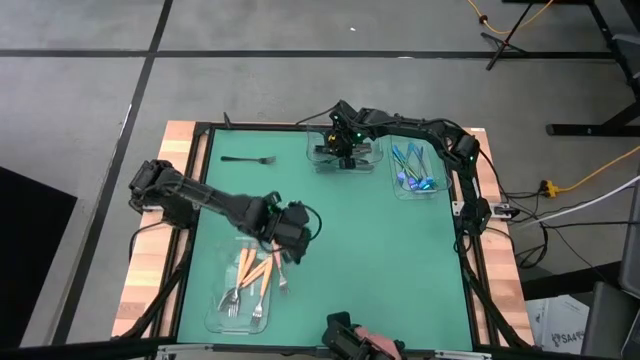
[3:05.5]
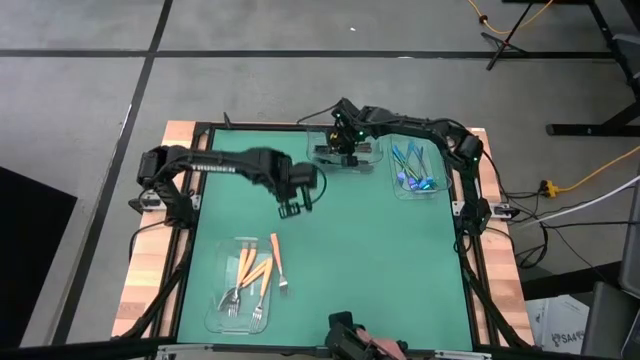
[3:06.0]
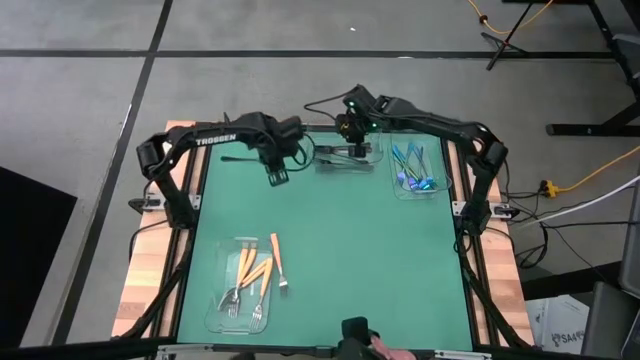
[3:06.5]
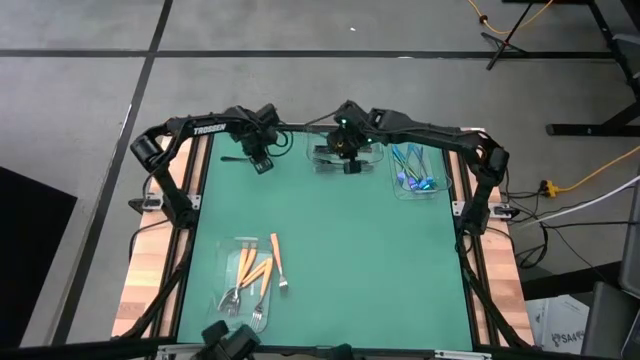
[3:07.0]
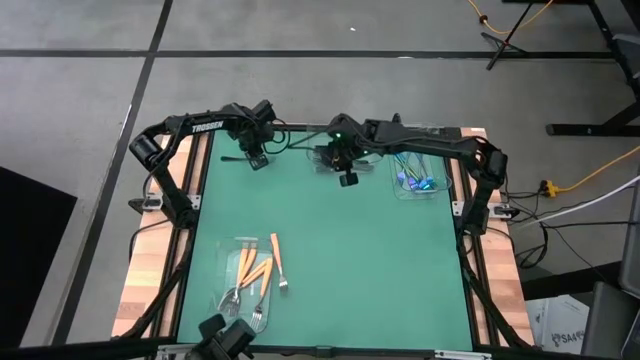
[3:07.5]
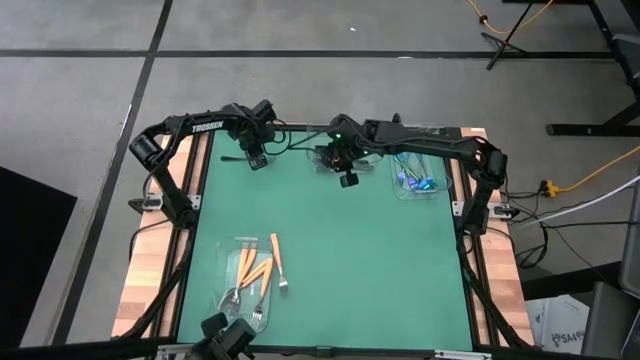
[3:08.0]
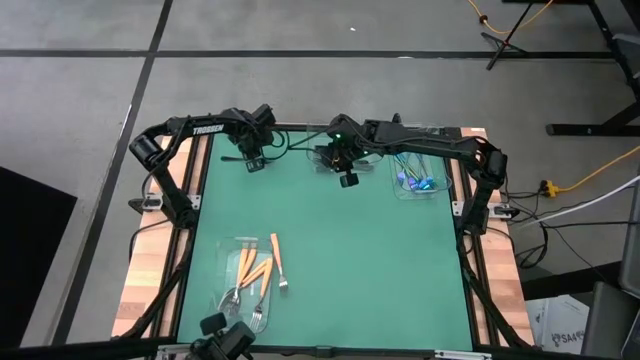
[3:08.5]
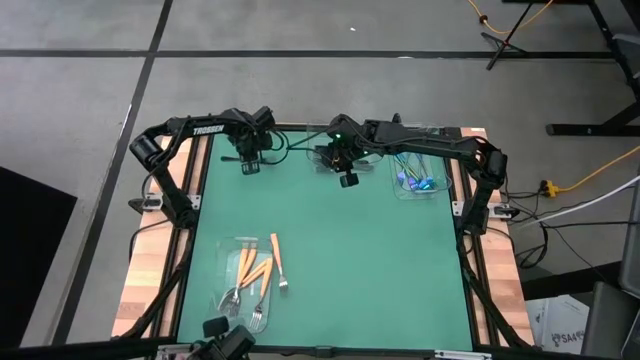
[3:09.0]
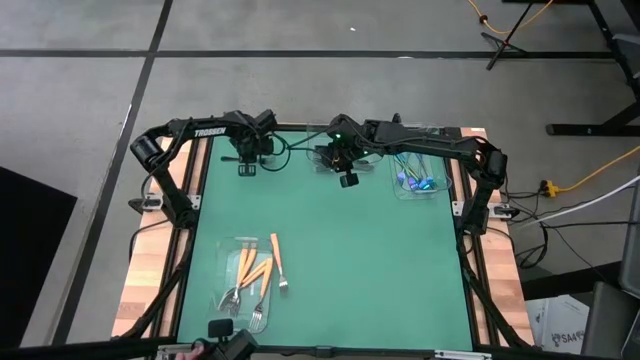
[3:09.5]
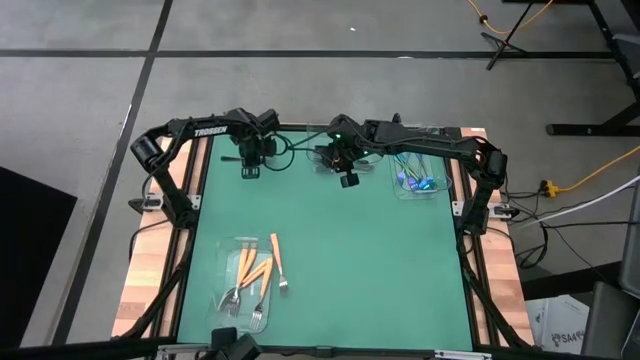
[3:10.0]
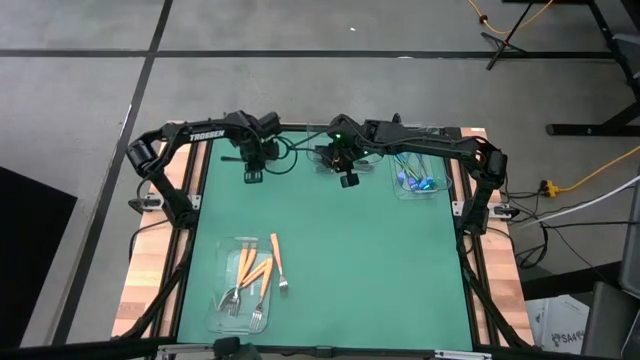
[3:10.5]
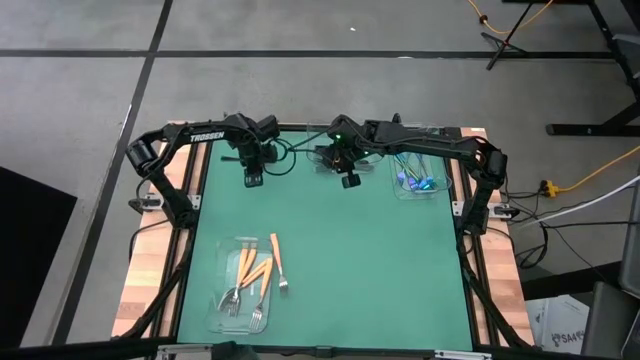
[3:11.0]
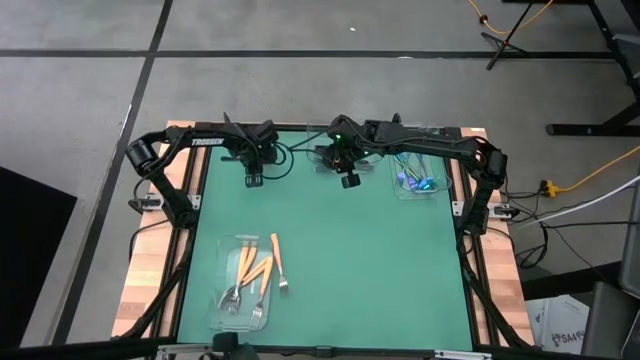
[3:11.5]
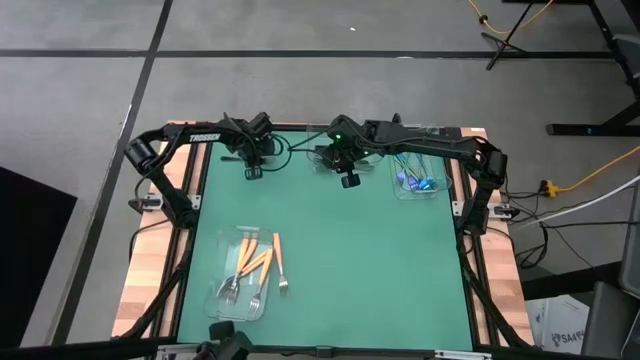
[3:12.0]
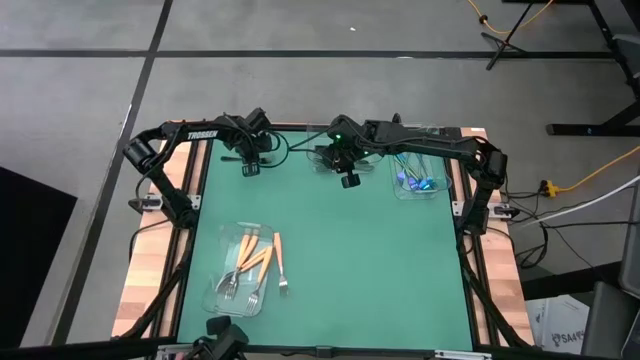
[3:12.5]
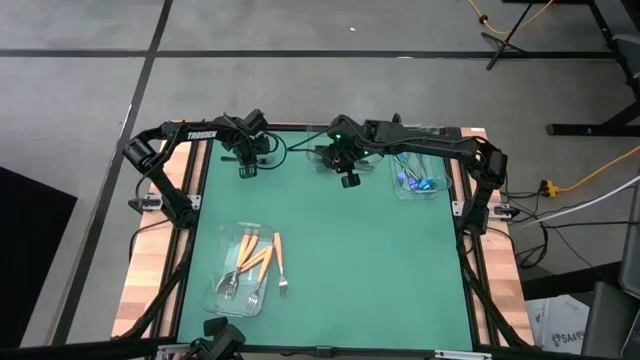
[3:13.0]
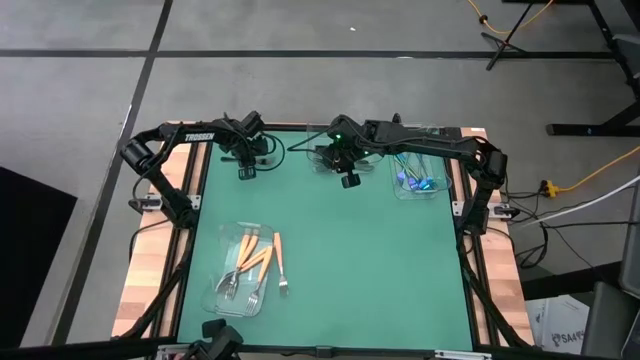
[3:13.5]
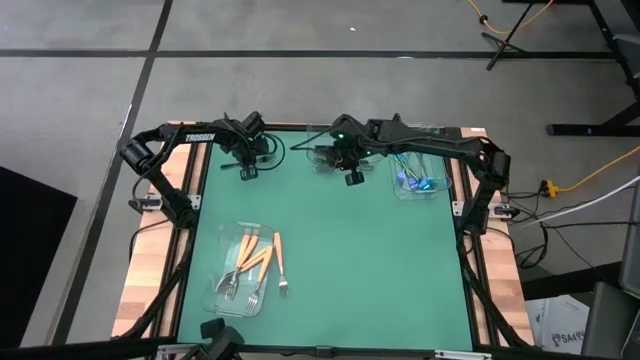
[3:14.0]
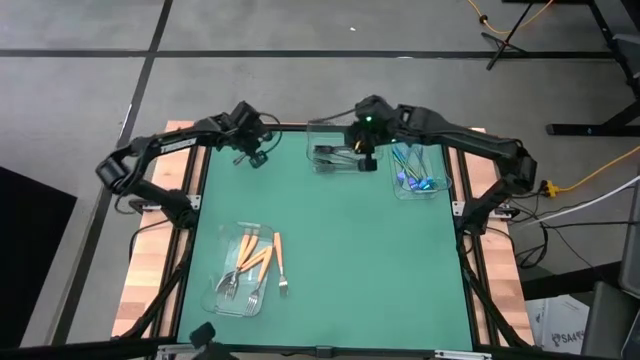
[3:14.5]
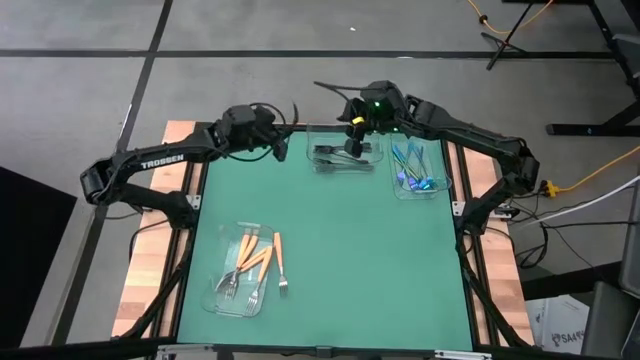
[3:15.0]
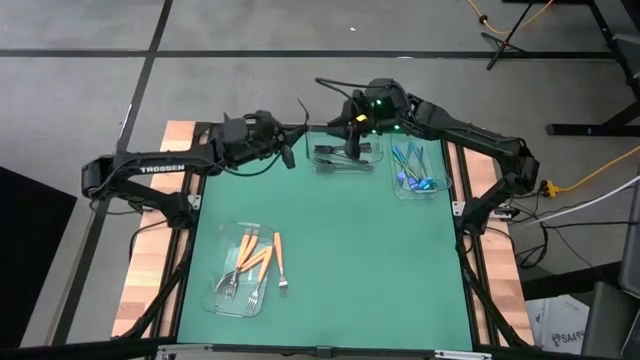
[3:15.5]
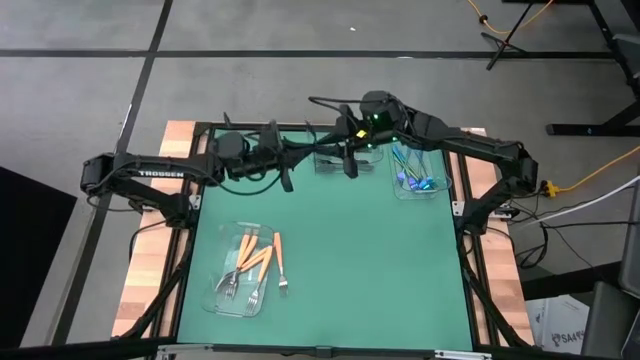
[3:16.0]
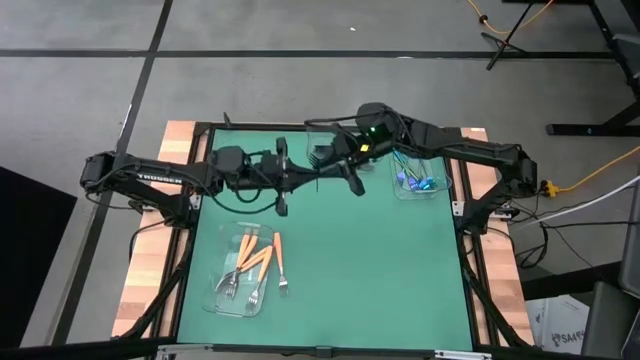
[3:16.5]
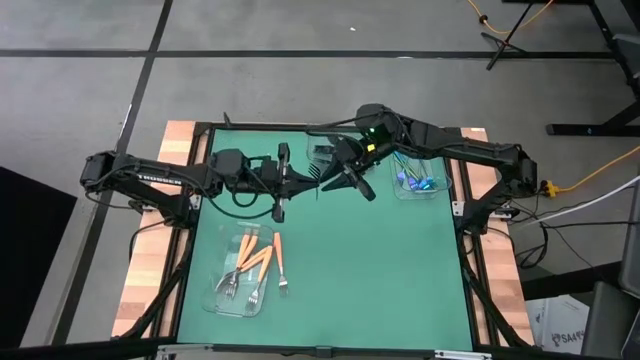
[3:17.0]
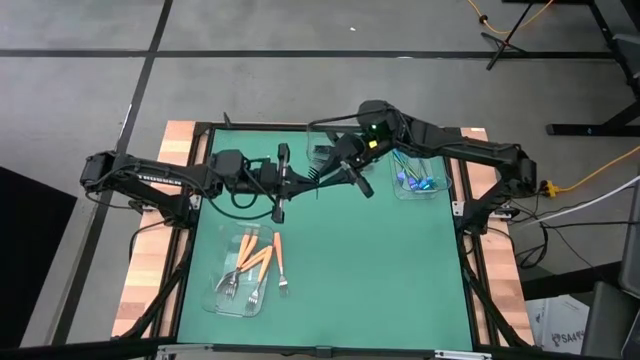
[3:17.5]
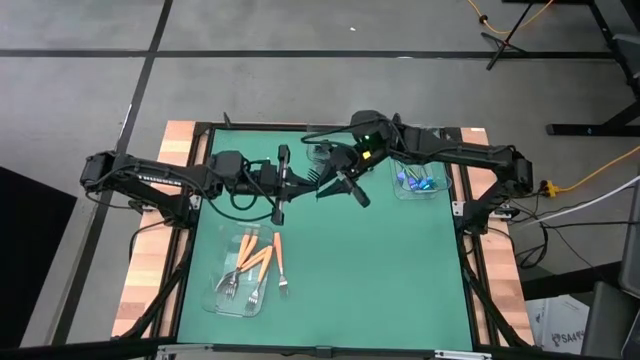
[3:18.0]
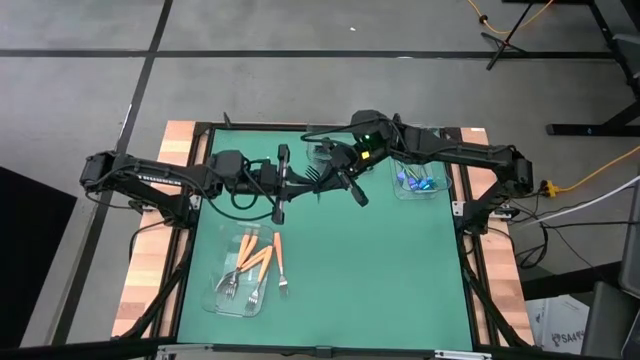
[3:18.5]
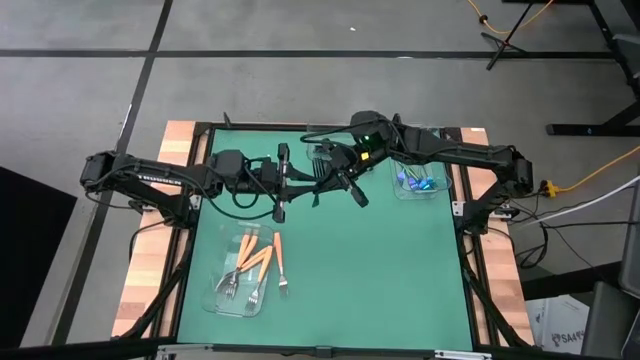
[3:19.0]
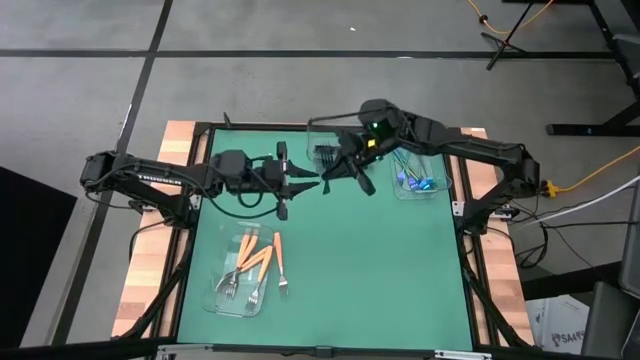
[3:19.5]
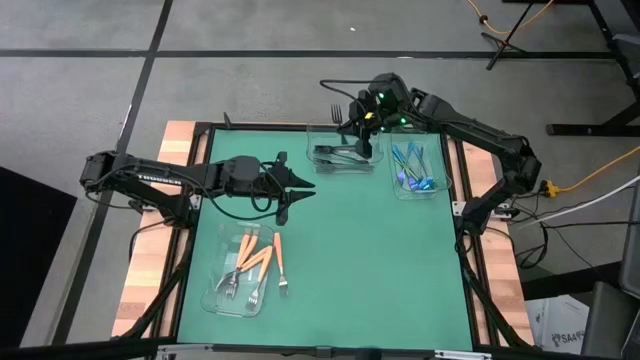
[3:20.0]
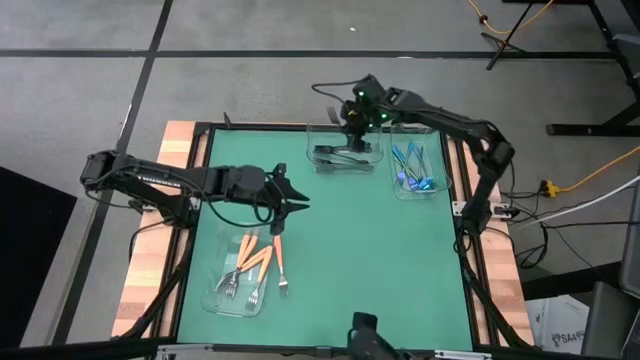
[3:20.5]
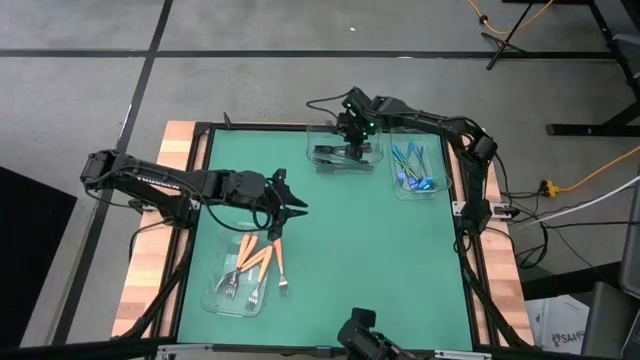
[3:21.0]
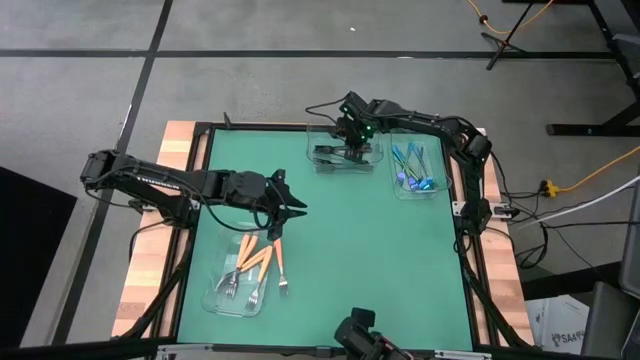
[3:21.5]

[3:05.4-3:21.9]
Task: Sort silverware by color (type)
Put the black fork into the top left transparent bin

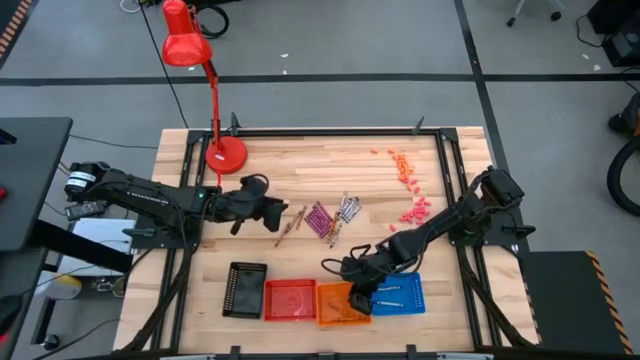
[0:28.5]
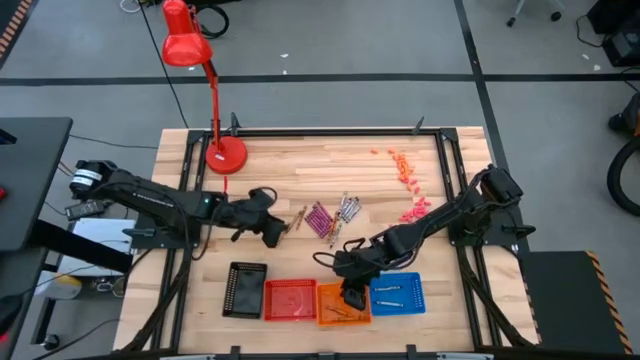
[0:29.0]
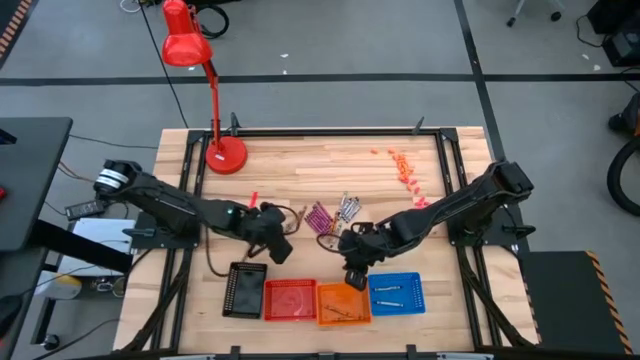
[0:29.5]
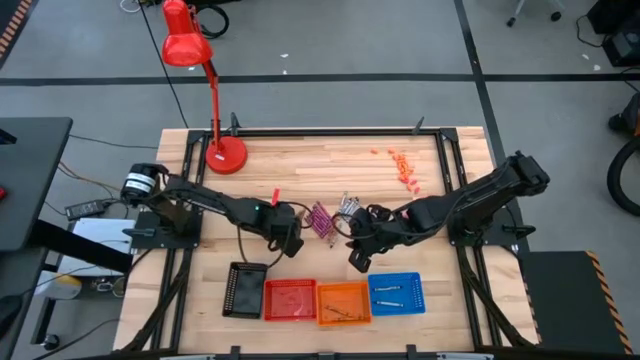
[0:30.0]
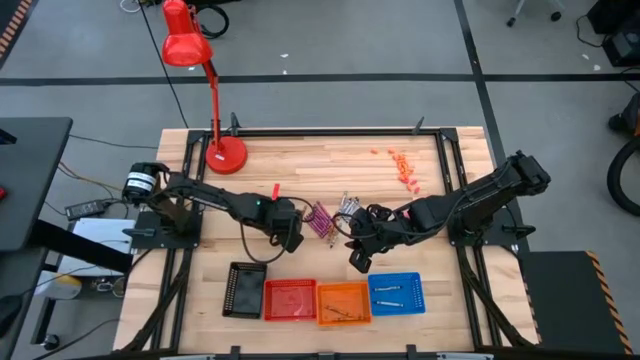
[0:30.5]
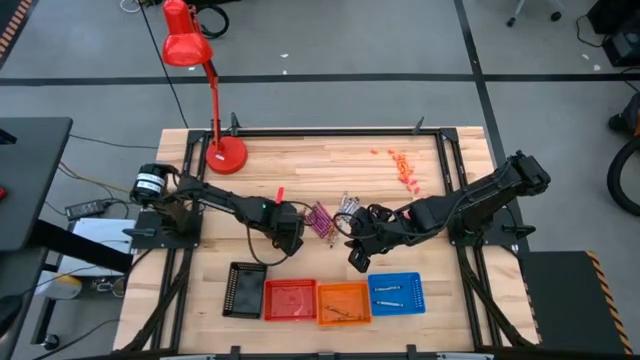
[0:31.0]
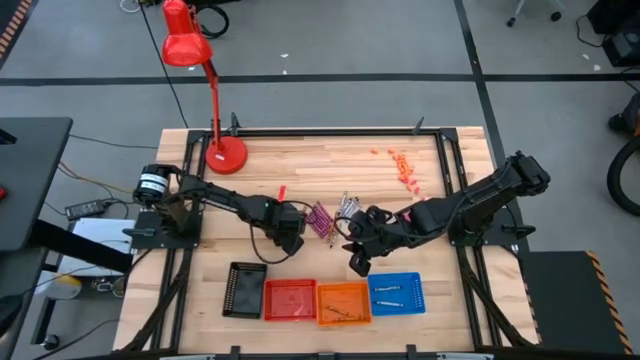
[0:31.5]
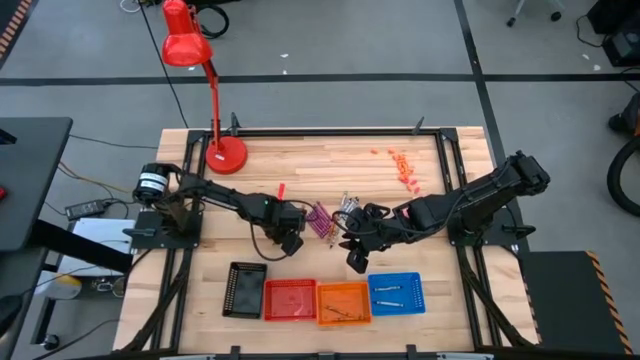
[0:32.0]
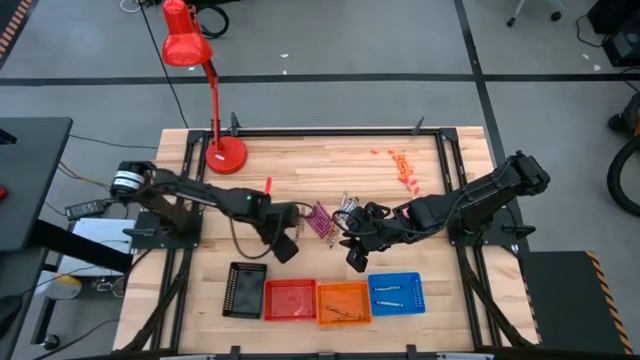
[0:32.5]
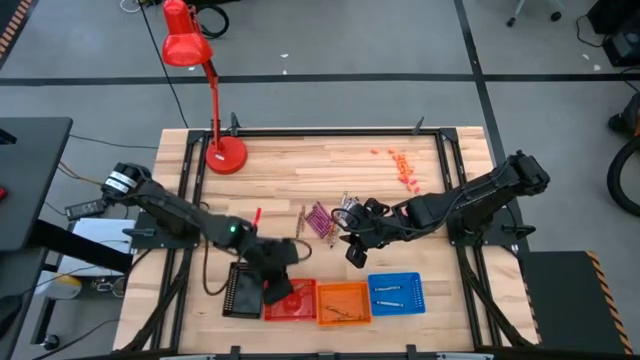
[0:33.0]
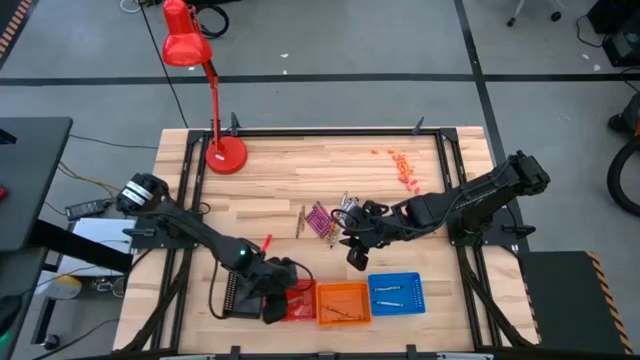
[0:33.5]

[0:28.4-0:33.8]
Task: Sort crayons
Put the brown crayon into the red bin
